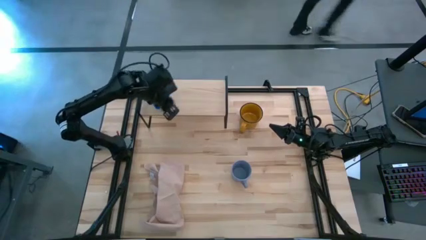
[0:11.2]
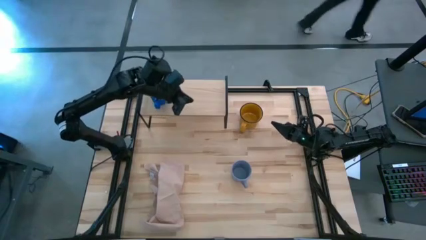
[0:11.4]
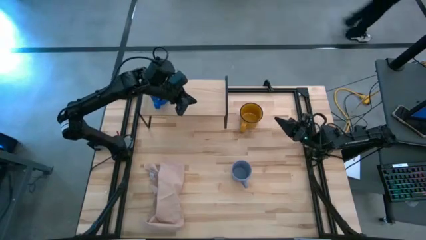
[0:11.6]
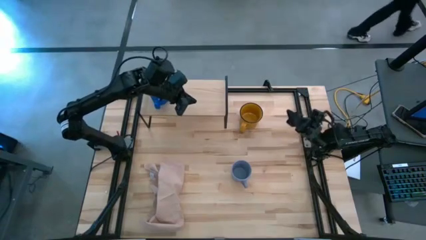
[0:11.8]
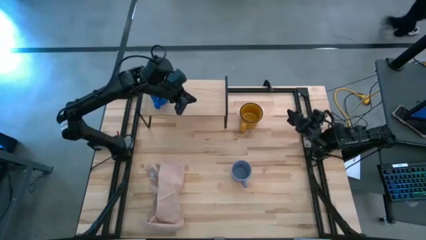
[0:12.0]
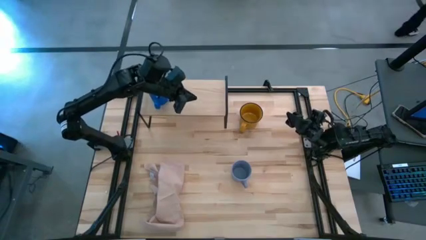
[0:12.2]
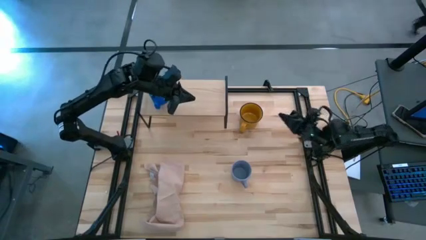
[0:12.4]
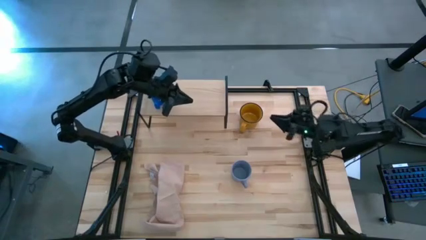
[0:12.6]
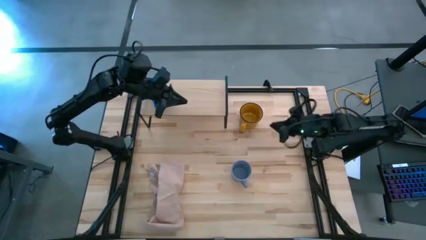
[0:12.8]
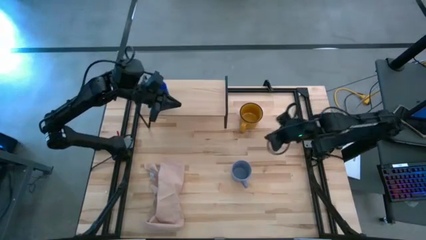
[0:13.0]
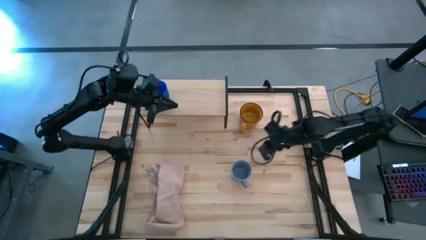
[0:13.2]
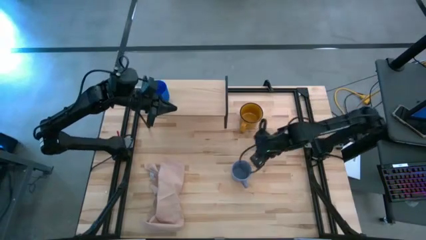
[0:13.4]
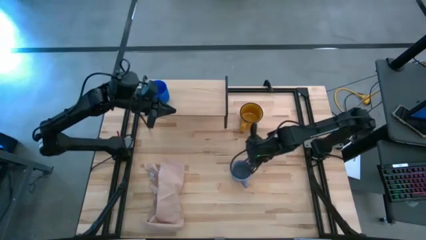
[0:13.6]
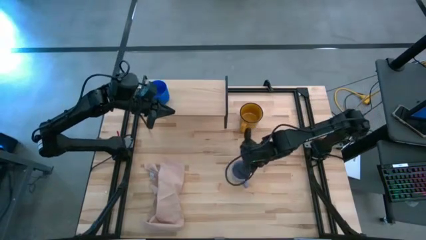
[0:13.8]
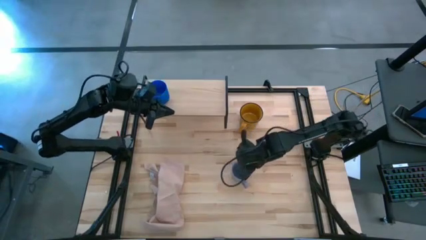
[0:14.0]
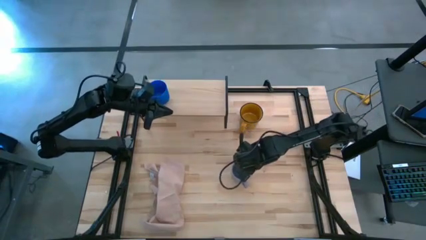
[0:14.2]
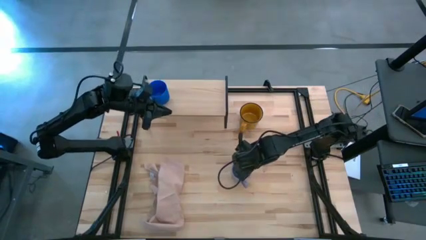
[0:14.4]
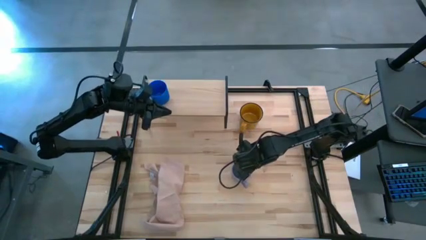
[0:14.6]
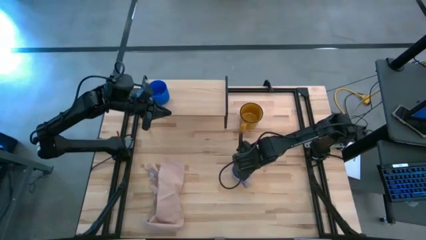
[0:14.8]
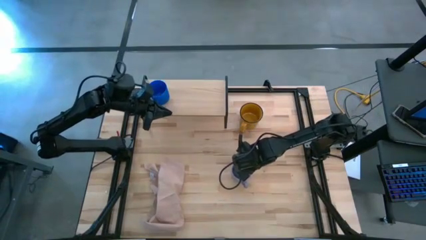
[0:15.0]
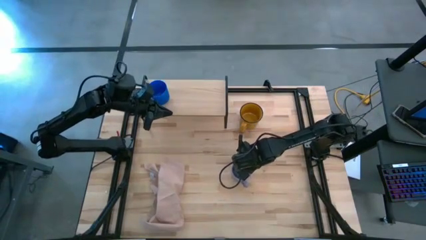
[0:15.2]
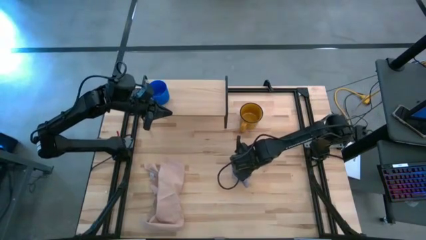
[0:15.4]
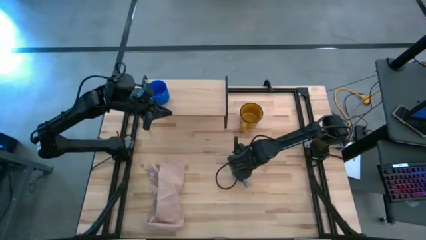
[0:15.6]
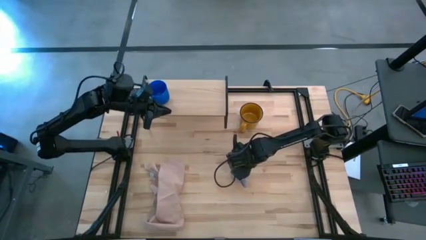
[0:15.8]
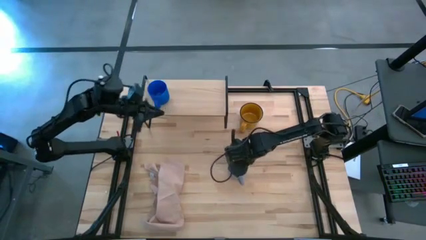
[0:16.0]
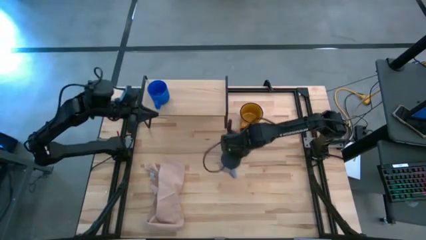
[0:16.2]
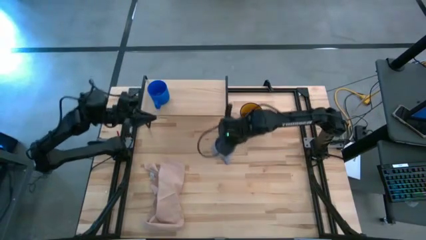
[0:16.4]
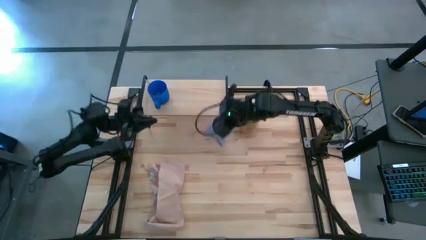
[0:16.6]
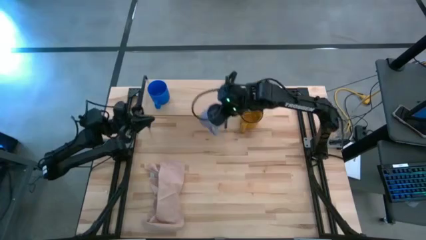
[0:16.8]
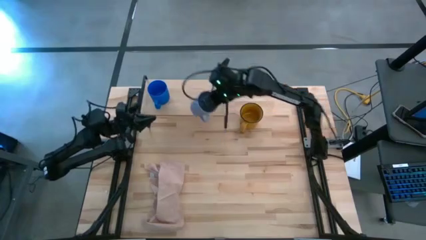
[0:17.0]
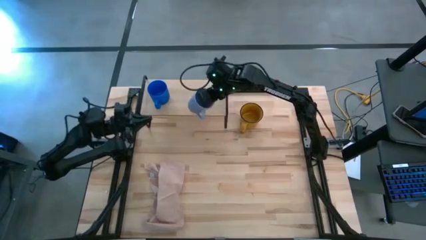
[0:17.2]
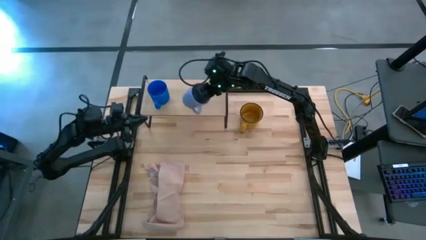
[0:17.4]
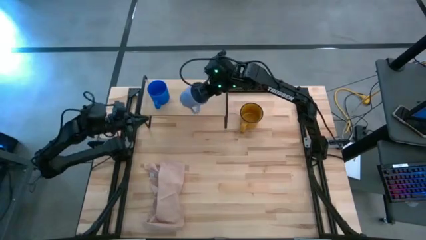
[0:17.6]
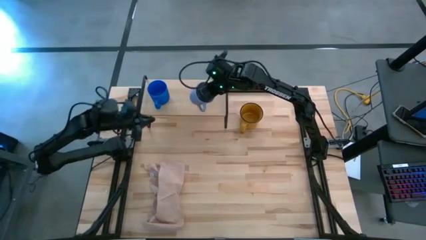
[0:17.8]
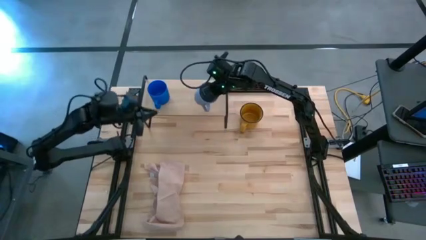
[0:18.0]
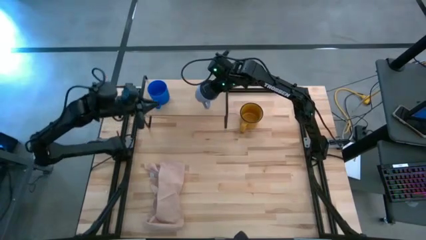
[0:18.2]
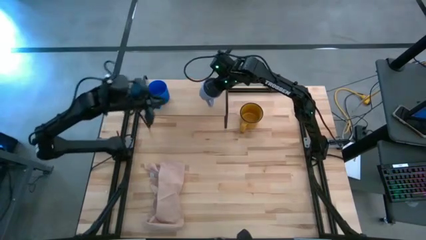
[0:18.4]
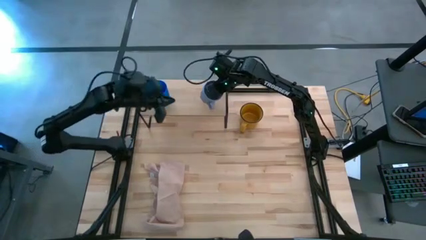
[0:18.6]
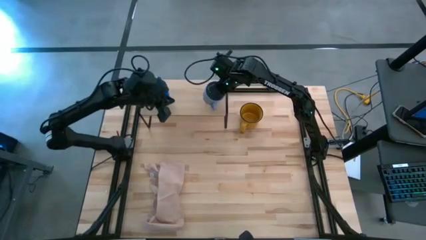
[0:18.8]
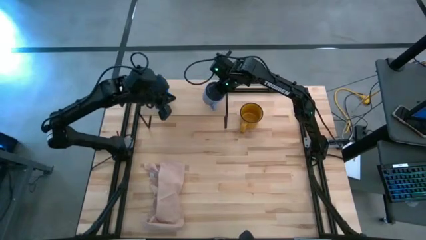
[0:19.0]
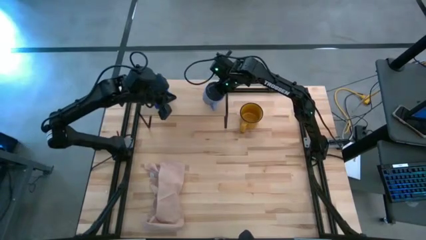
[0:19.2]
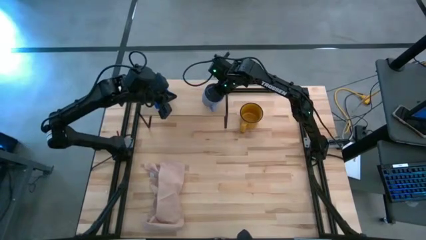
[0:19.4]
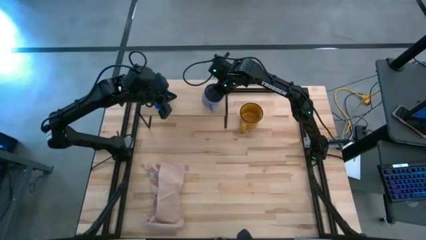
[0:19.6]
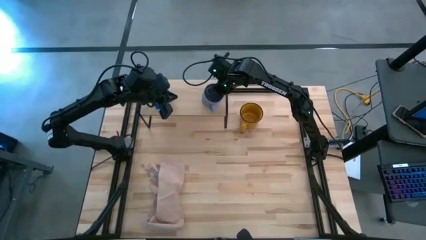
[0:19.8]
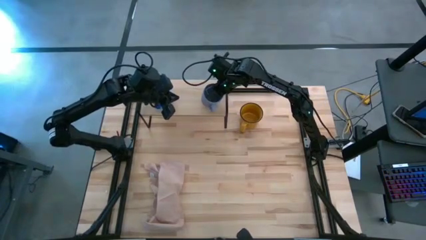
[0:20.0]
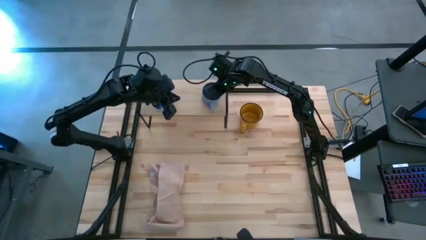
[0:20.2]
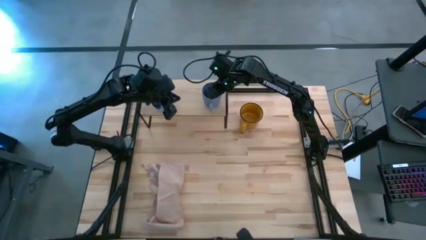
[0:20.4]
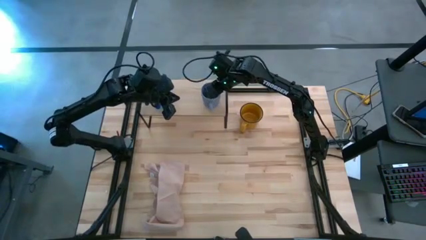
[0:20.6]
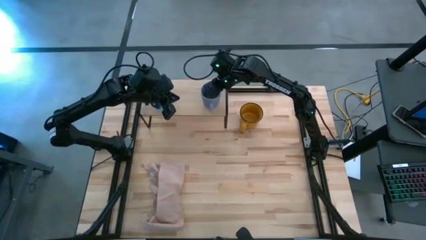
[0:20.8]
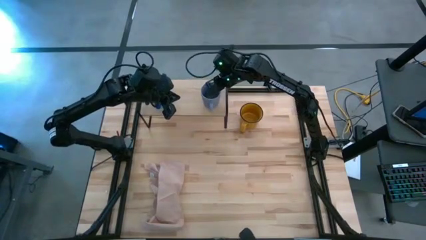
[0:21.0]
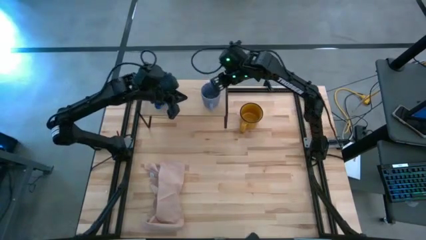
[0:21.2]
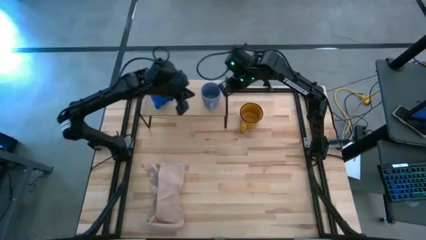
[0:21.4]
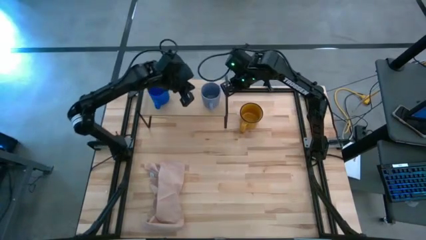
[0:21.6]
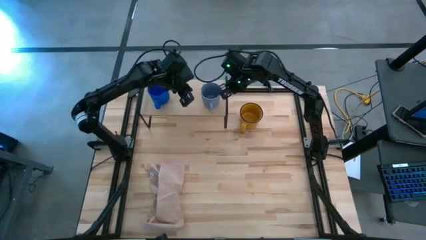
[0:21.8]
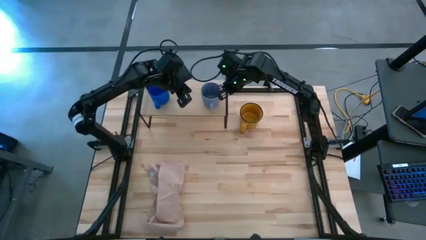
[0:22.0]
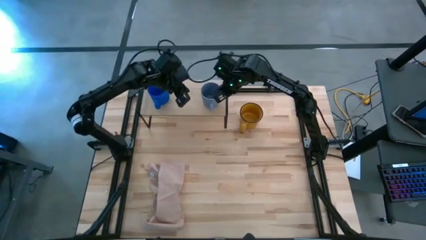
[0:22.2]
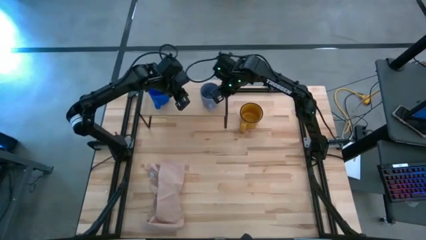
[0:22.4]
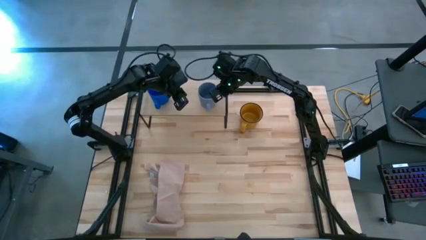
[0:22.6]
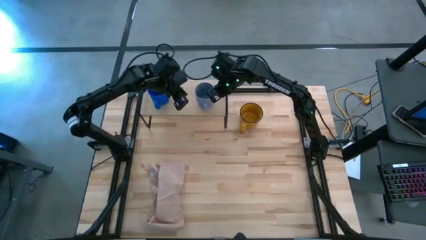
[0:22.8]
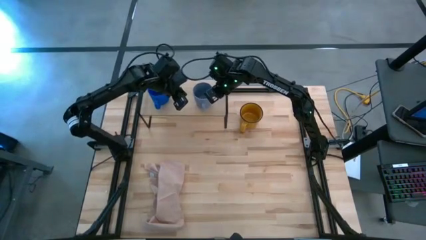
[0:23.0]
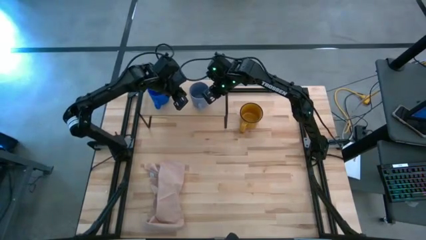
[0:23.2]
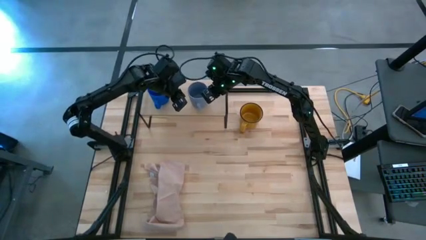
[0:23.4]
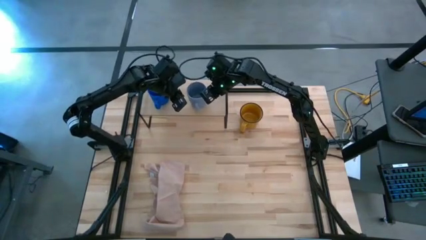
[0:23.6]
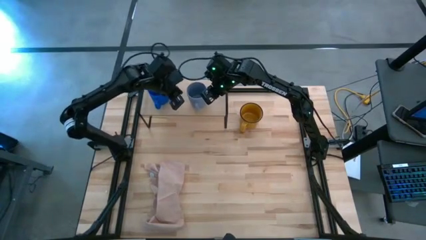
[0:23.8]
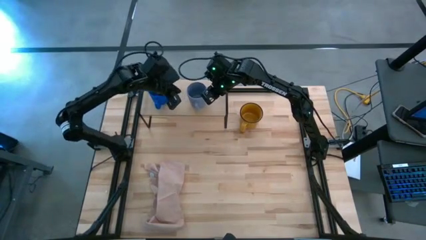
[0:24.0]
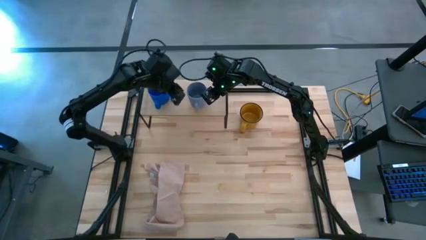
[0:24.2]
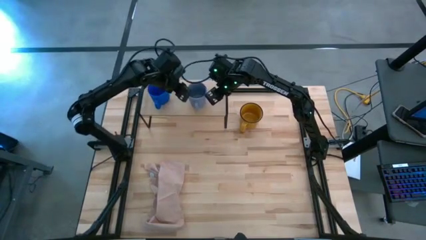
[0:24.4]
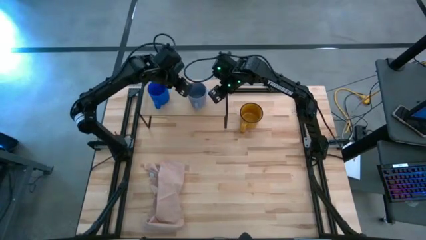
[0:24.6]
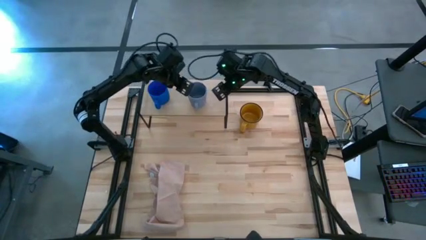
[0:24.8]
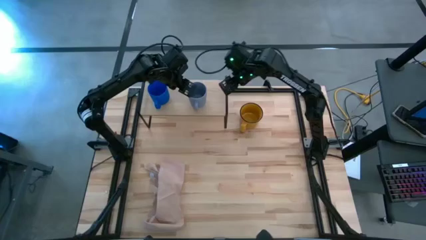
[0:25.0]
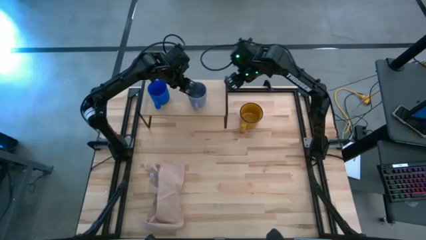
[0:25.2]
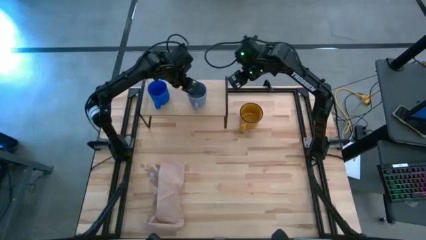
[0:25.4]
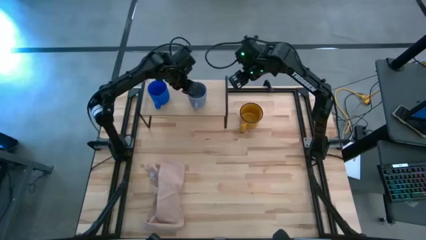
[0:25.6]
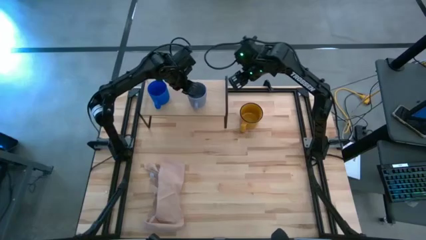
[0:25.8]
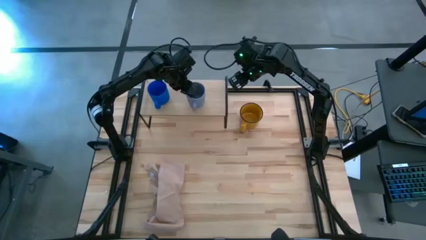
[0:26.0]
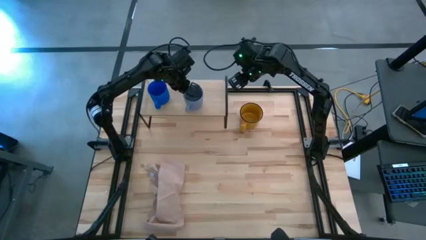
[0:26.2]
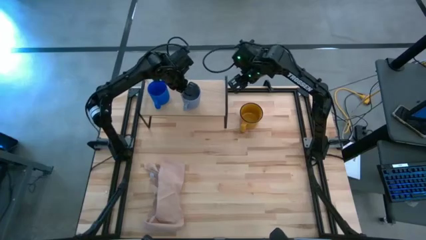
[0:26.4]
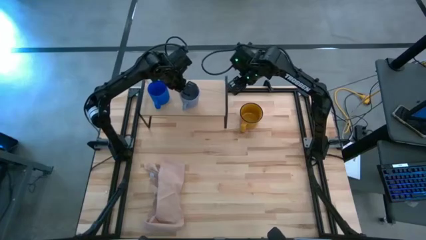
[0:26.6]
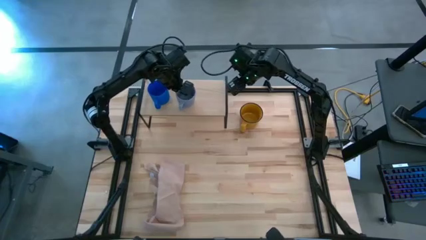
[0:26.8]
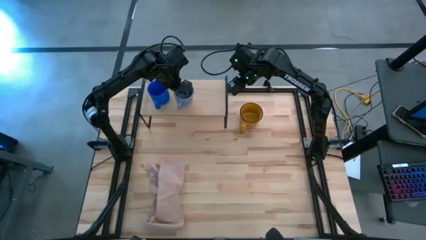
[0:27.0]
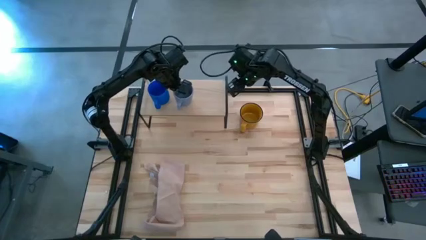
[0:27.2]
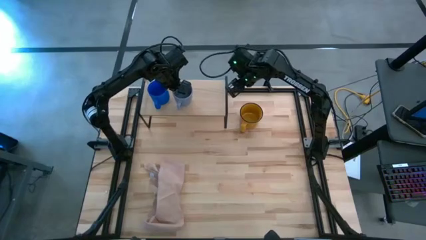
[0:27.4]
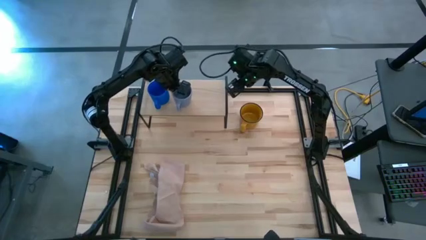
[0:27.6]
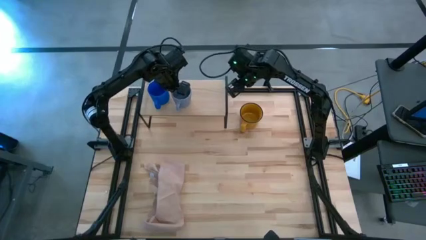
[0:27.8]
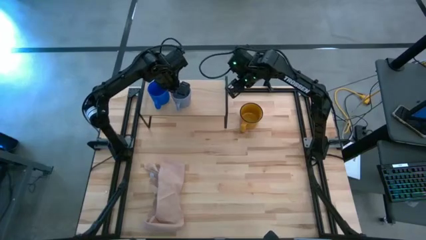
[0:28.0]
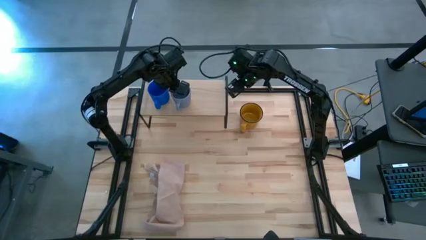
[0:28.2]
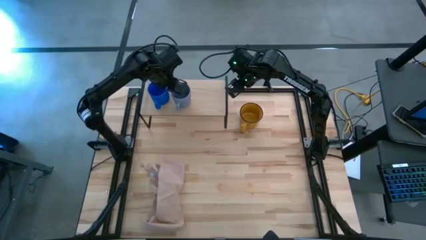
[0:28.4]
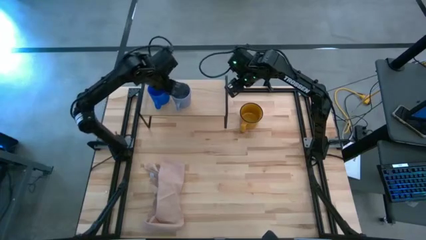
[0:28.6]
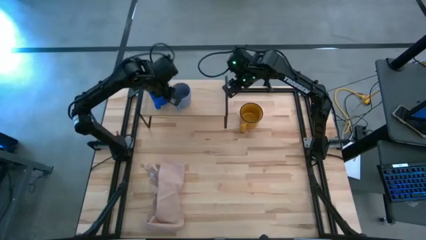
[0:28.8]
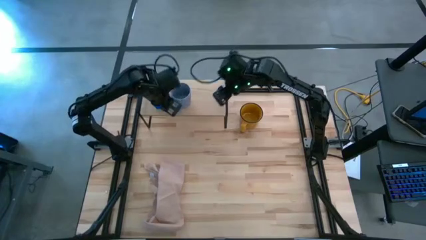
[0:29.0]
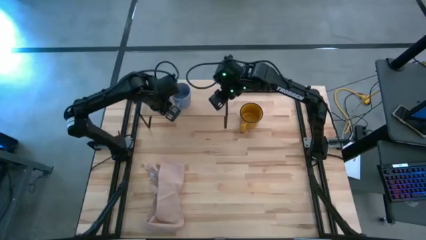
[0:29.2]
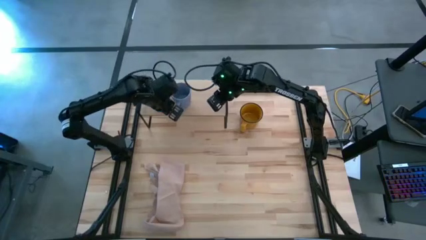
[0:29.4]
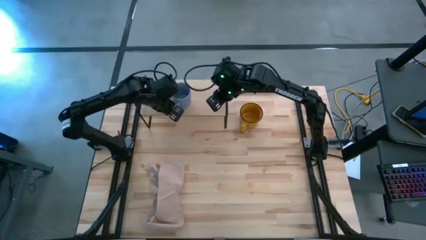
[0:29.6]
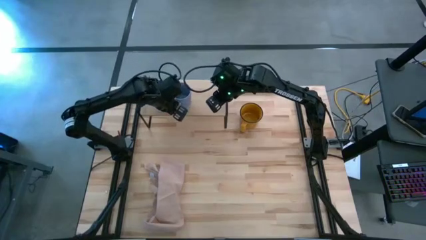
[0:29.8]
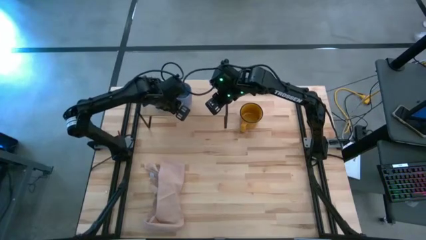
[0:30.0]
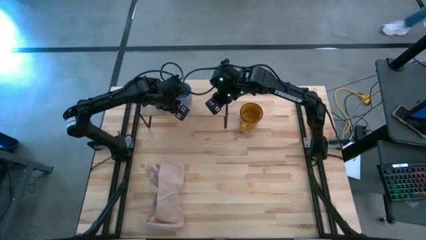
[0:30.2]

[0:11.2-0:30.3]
Task: Stack small to large cups/mugs on shelf
Put the light blue mug on the shelf
